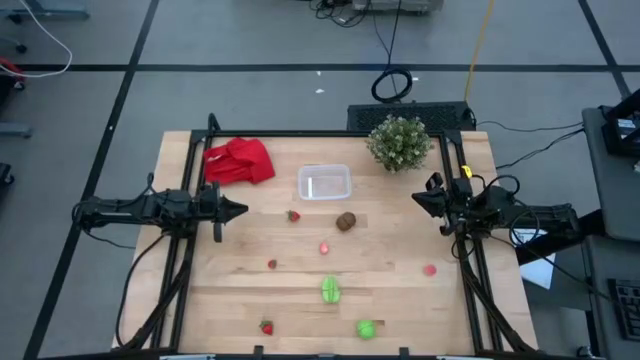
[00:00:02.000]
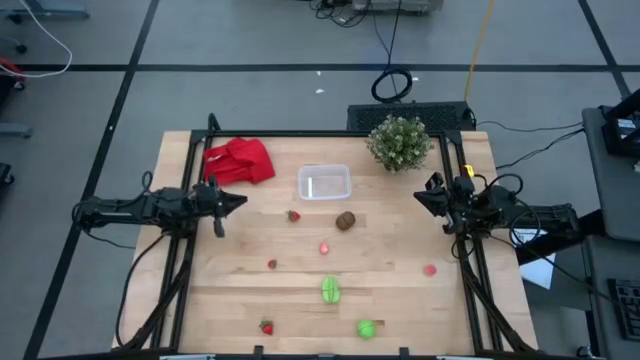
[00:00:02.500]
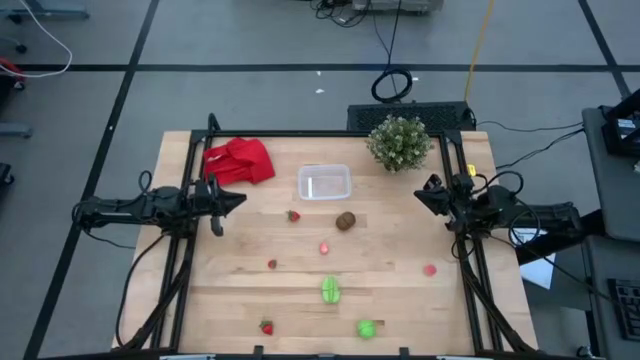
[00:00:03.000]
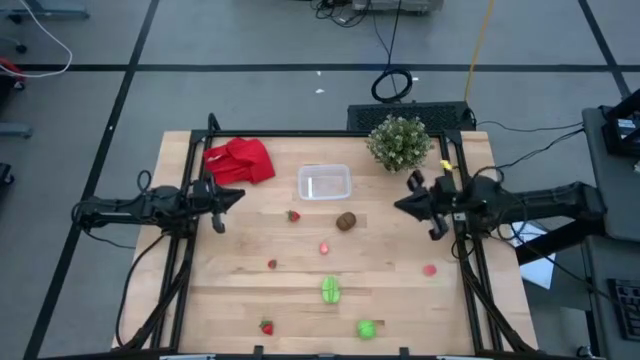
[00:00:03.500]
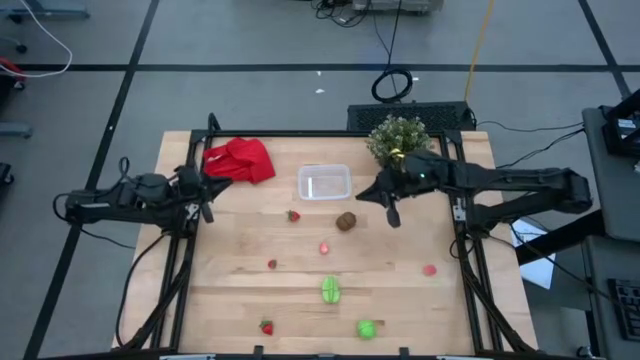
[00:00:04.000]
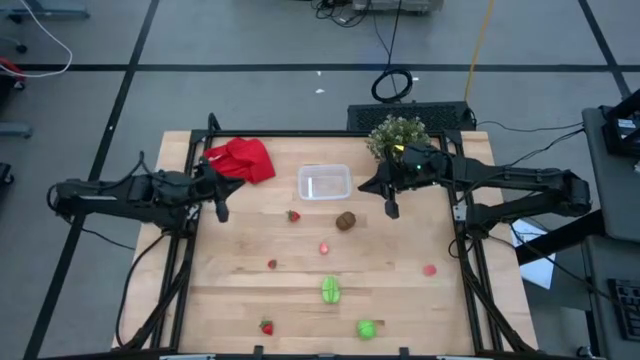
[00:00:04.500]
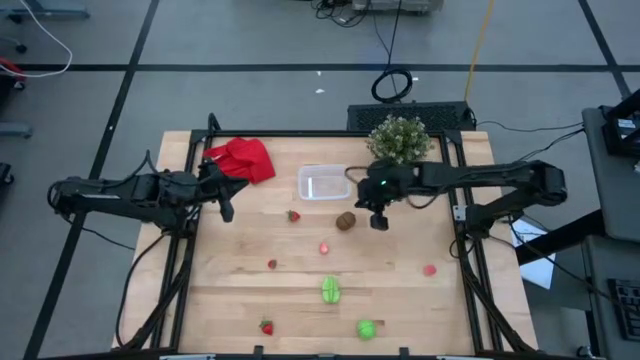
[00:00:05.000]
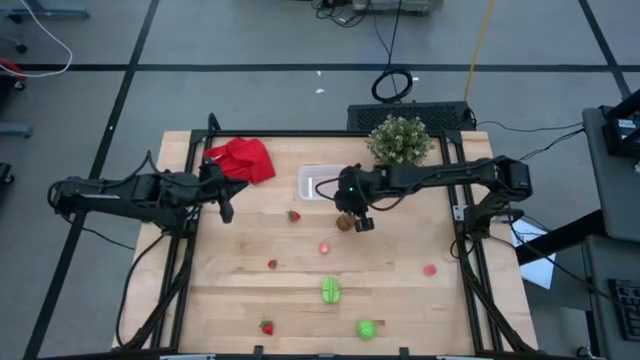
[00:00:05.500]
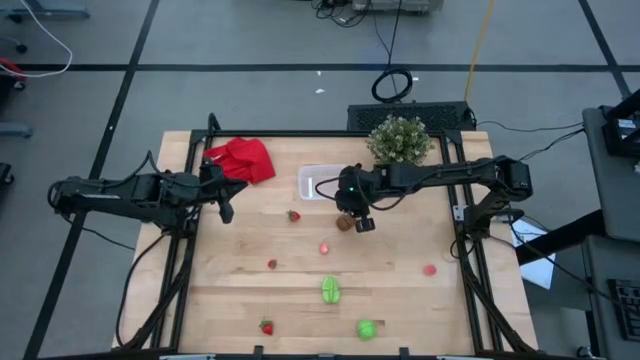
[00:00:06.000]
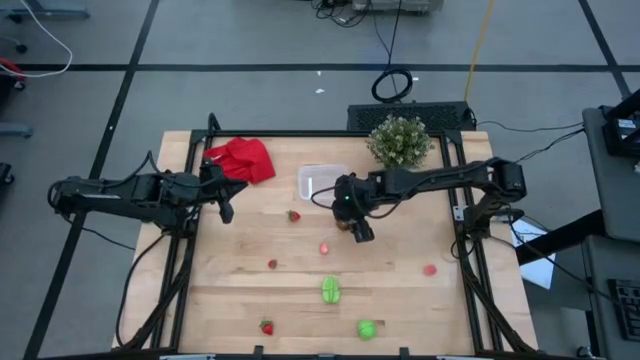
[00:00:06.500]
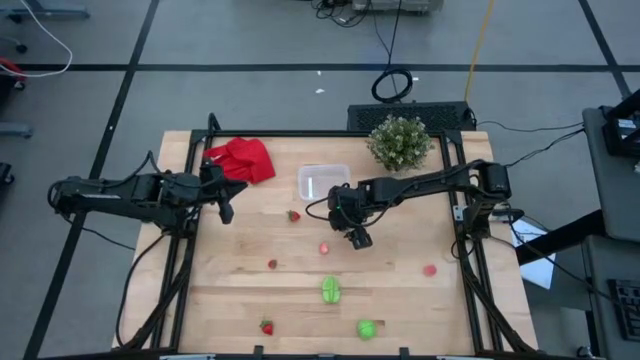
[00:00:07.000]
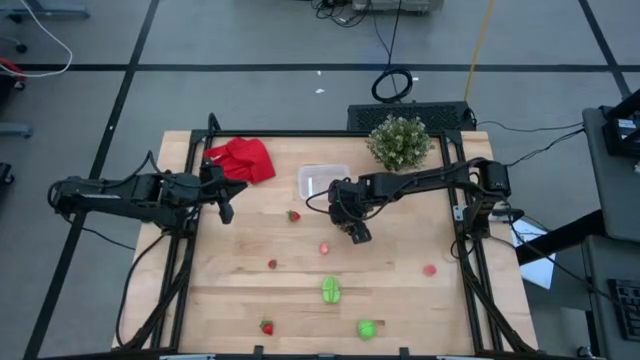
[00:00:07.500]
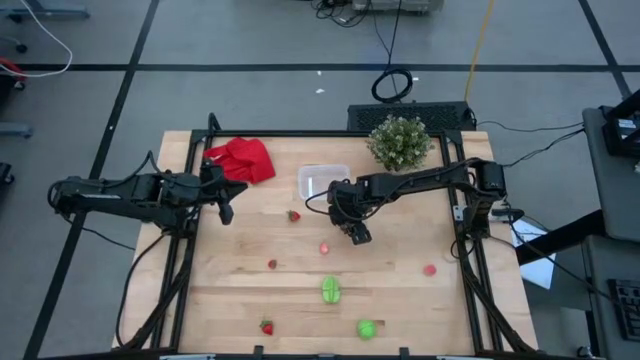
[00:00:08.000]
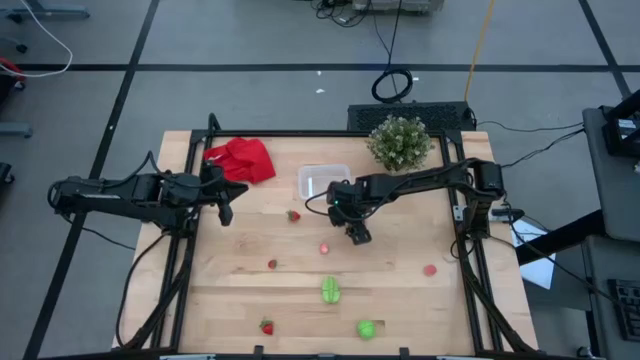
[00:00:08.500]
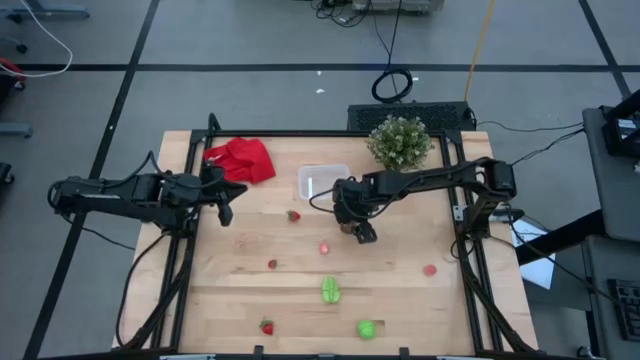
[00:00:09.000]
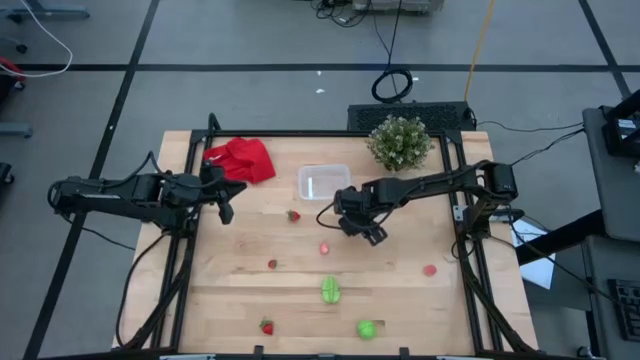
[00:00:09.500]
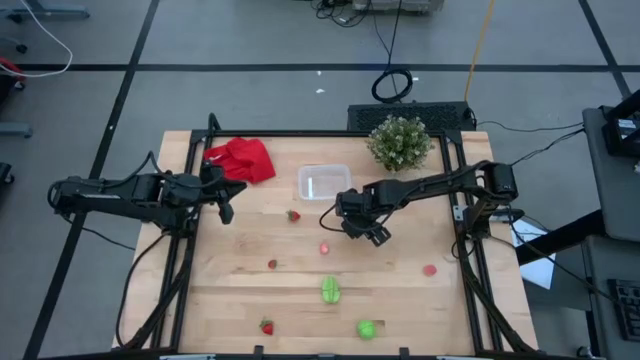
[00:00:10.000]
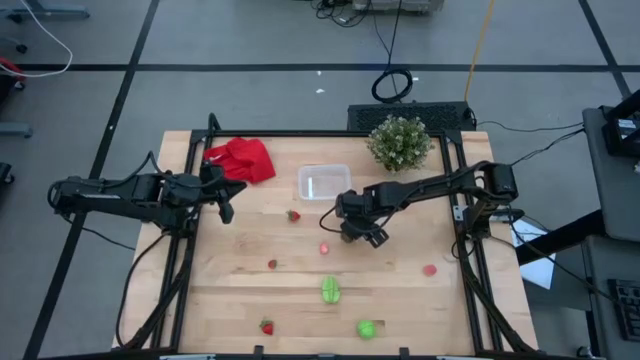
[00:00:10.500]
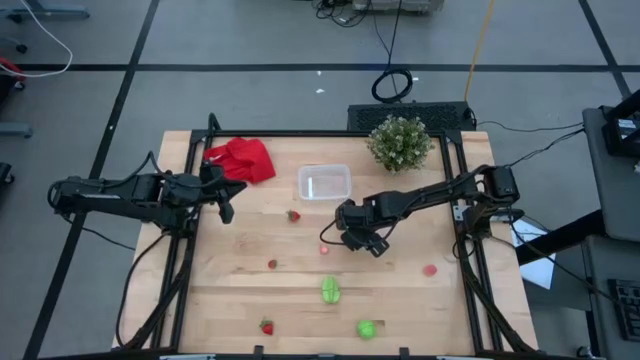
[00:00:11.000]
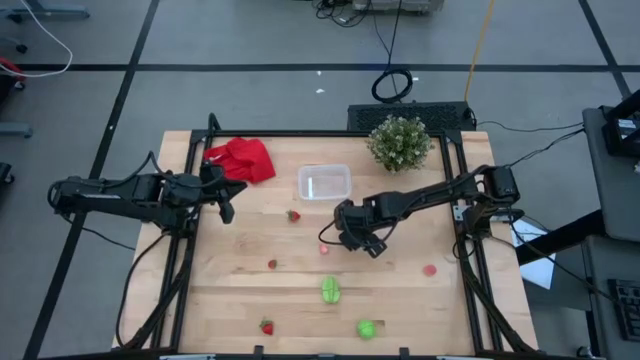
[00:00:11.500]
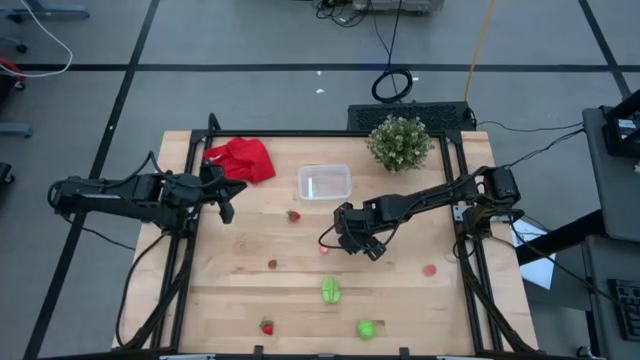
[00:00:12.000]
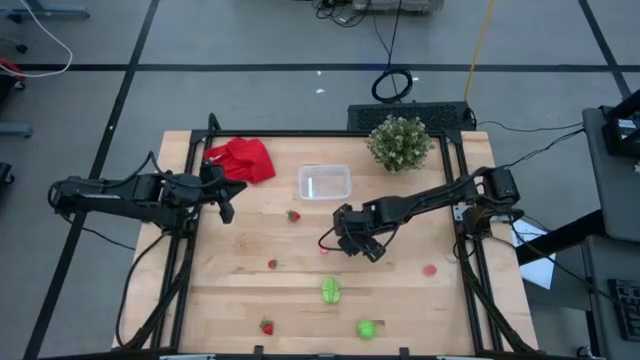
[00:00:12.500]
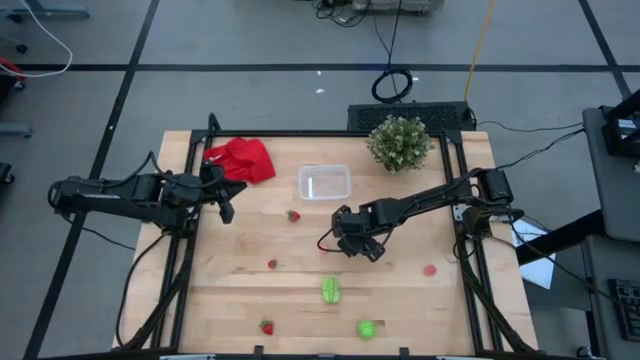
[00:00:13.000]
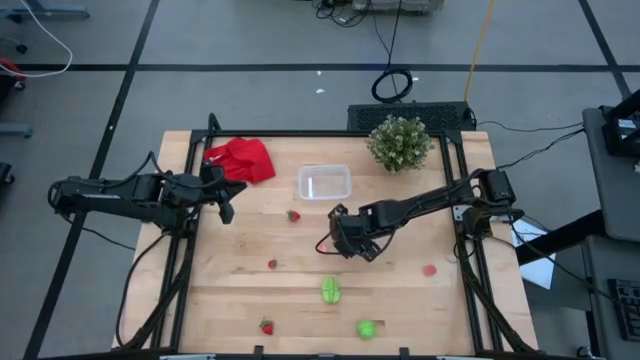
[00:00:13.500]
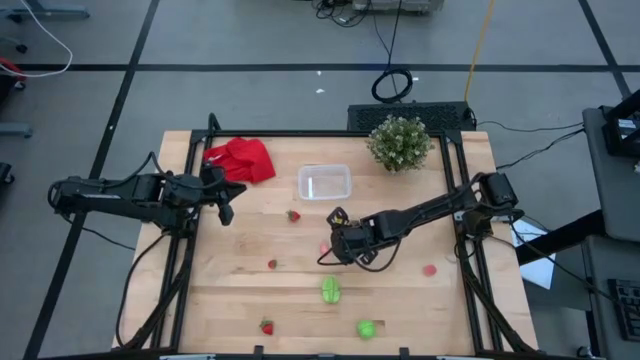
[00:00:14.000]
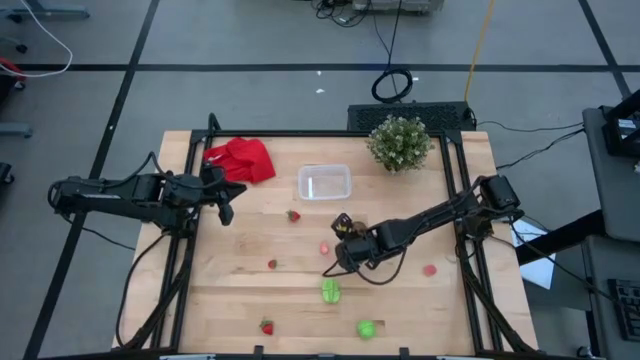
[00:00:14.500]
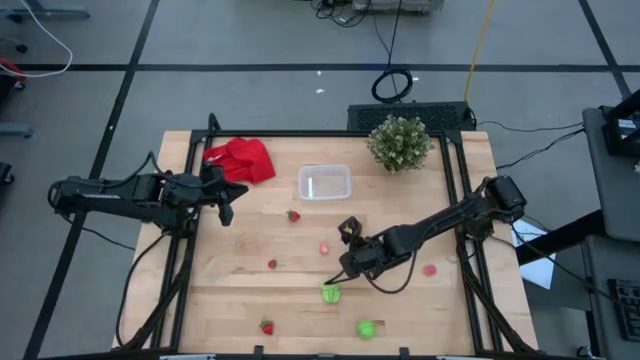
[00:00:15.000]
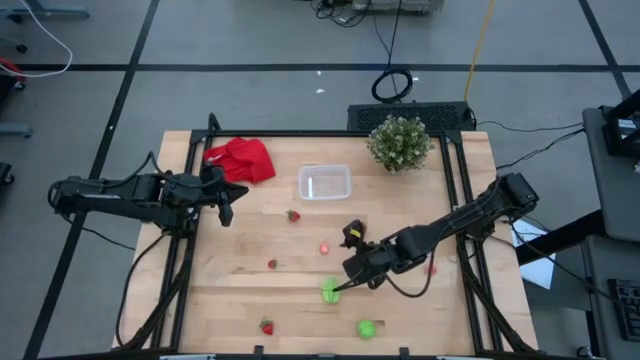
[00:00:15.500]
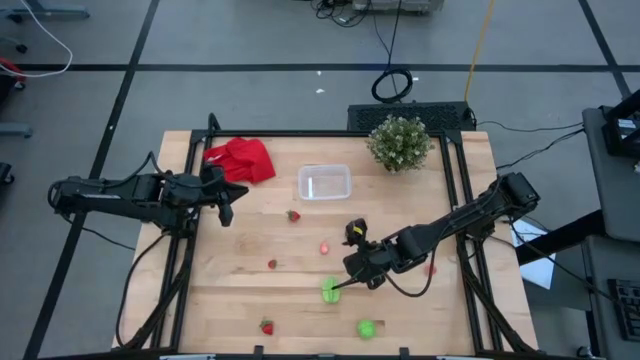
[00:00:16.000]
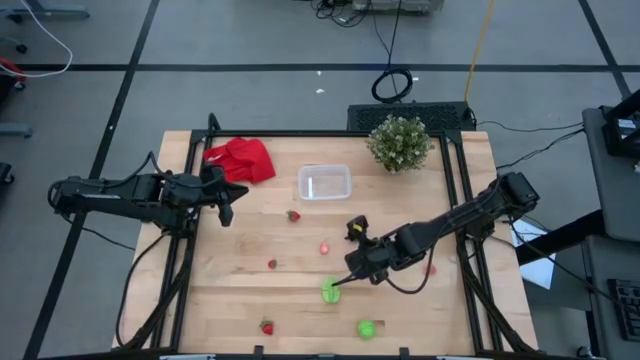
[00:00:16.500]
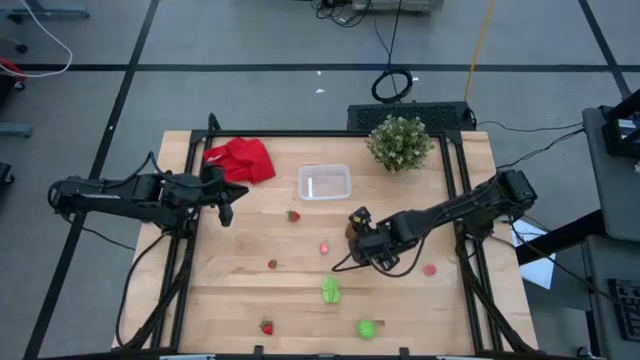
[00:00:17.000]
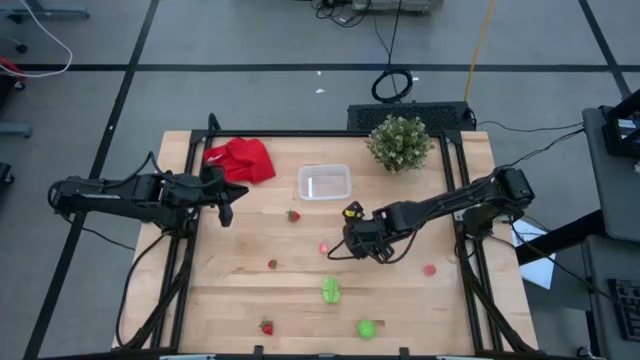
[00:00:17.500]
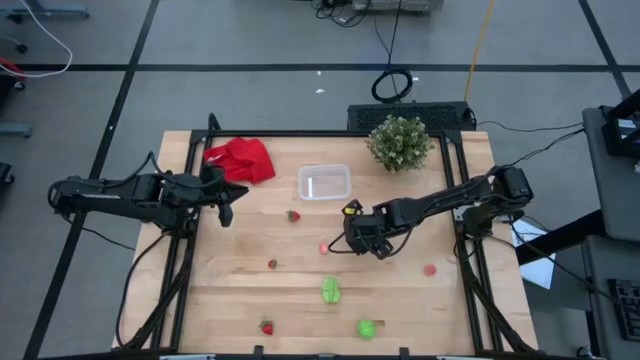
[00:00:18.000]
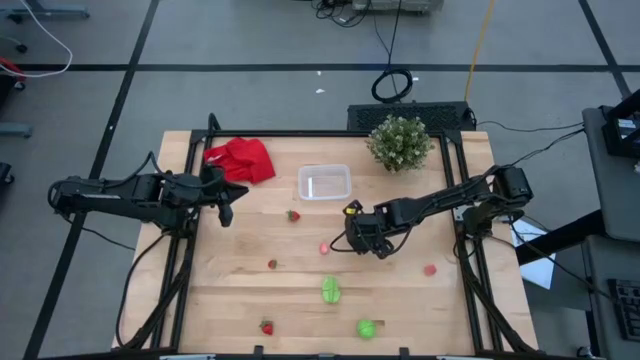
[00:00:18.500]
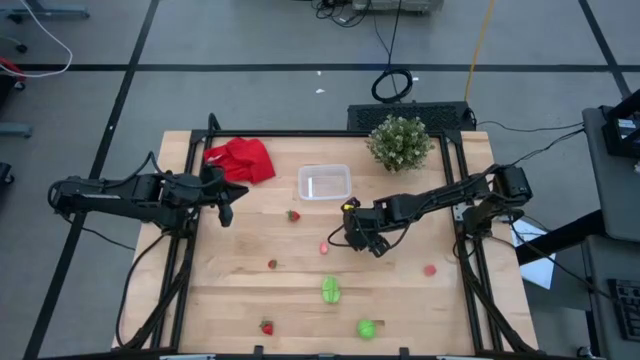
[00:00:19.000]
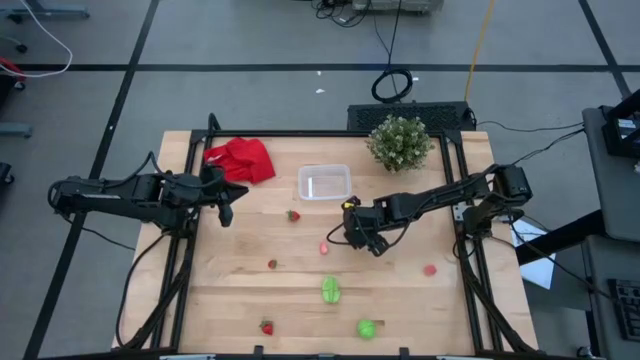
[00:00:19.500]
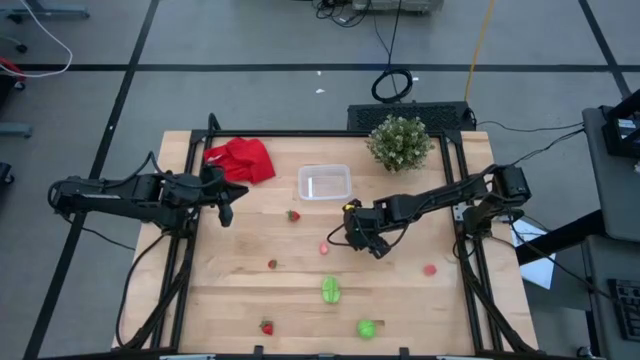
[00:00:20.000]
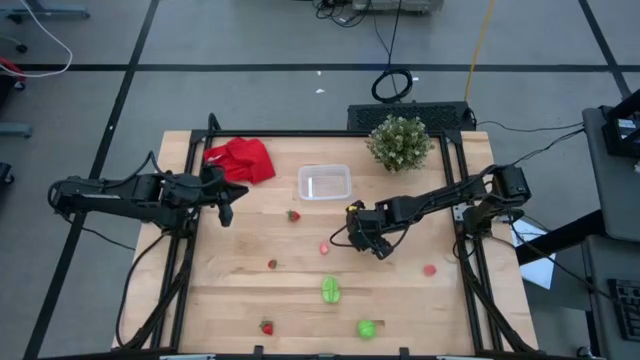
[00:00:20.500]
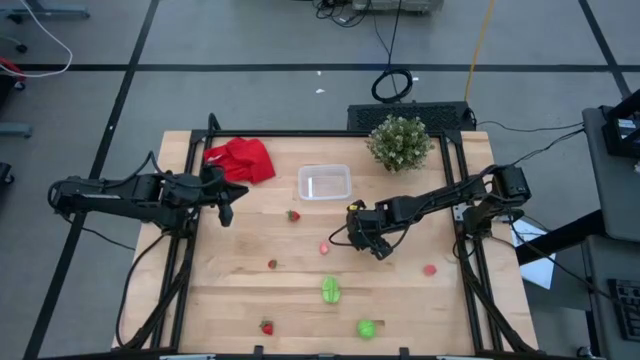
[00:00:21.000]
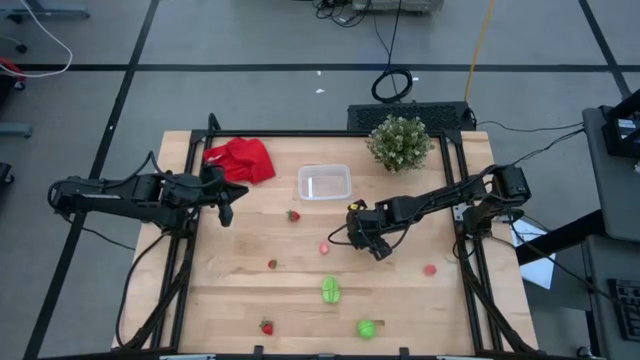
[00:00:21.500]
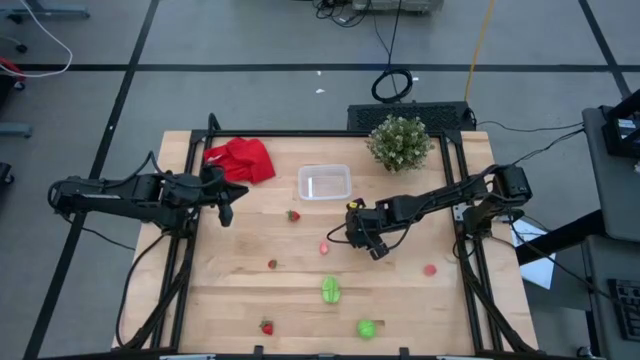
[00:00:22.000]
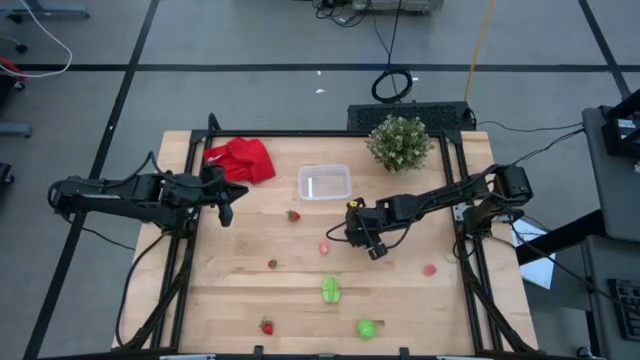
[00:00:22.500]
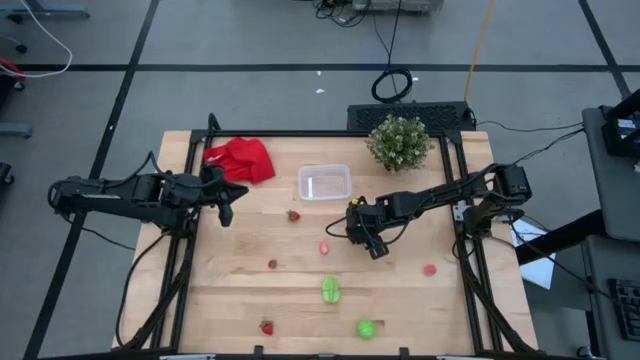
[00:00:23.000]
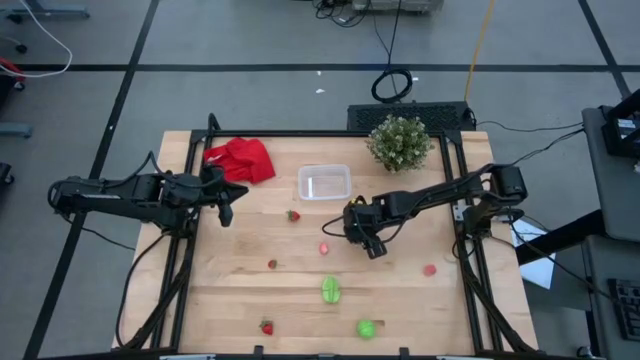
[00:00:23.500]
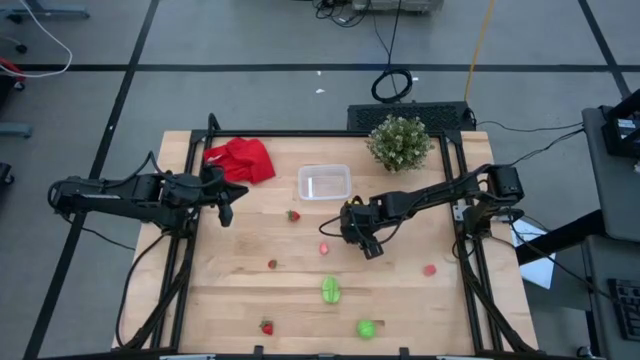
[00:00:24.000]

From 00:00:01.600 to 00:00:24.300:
Task: Pick and placing Produce into tupperware
Put the kiwi into the bin
